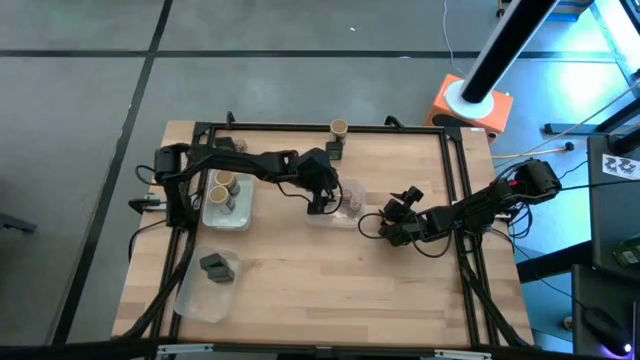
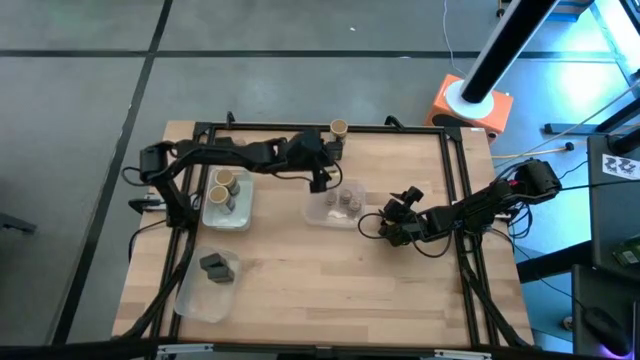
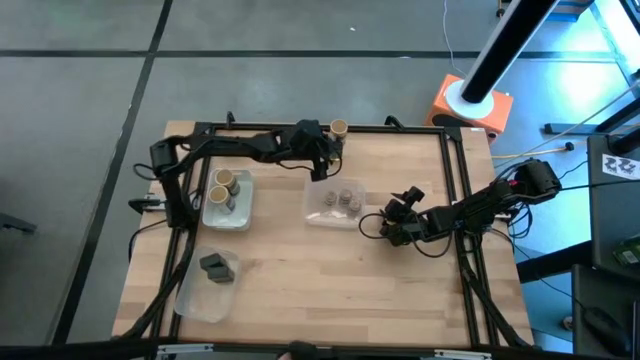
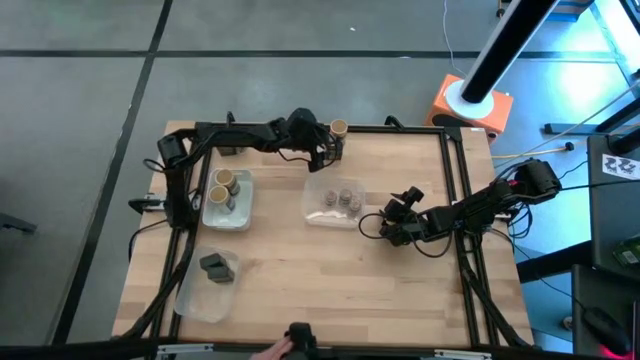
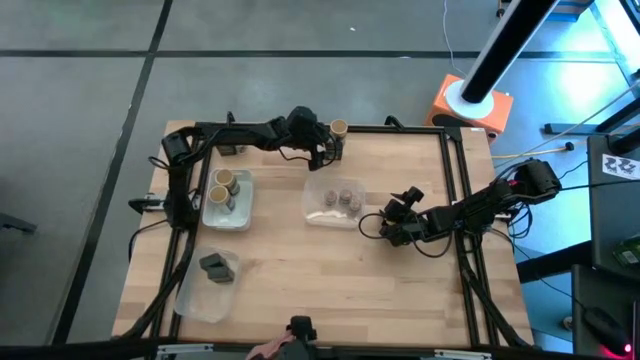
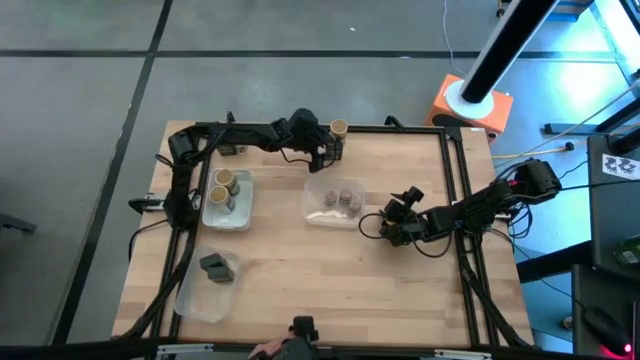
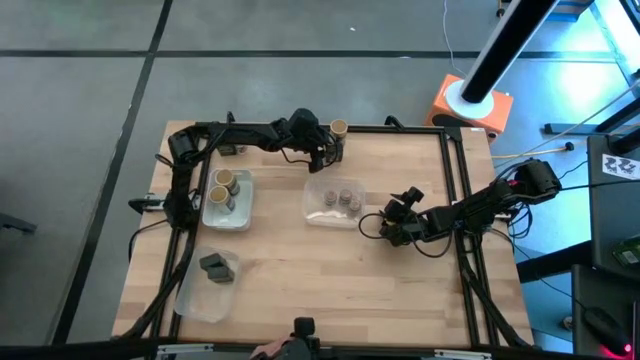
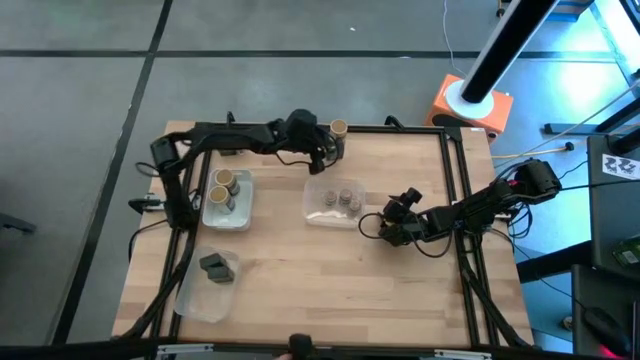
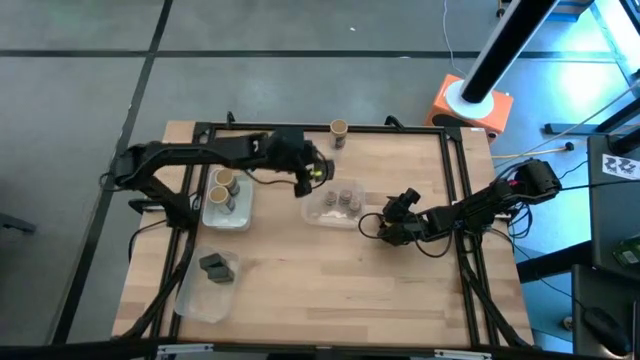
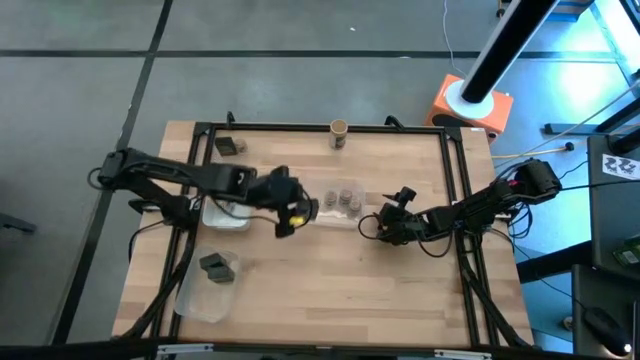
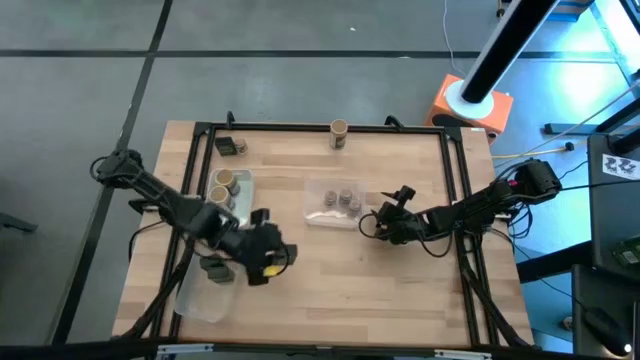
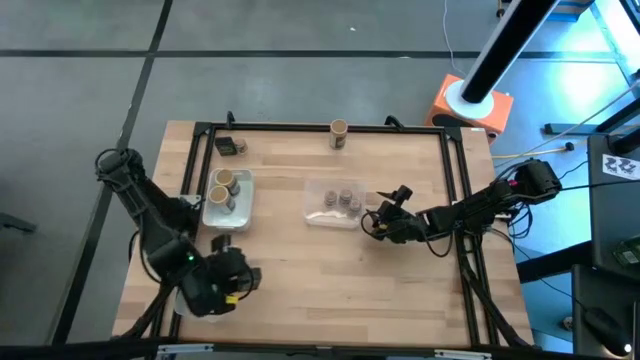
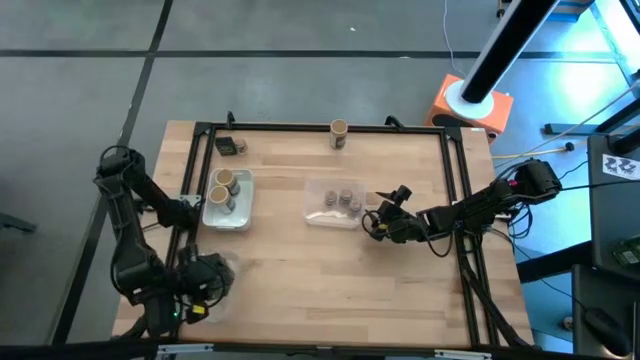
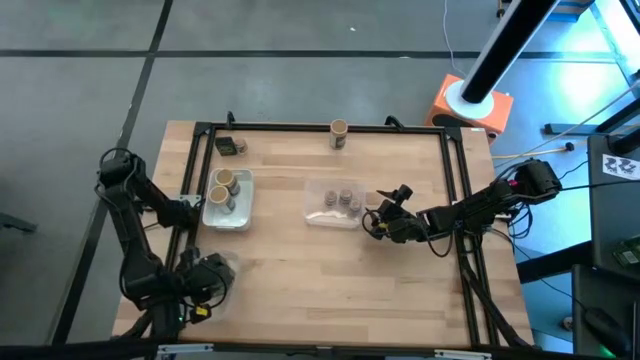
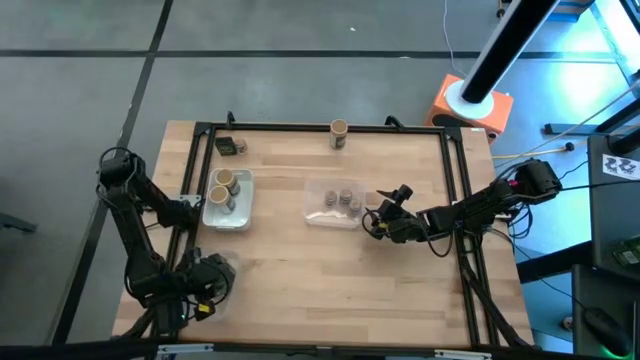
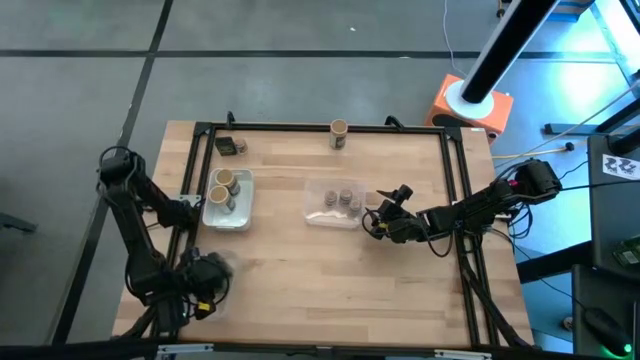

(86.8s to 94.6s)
Task: Sort spices by type
Put the black seasoning can into the bottom transparent bin

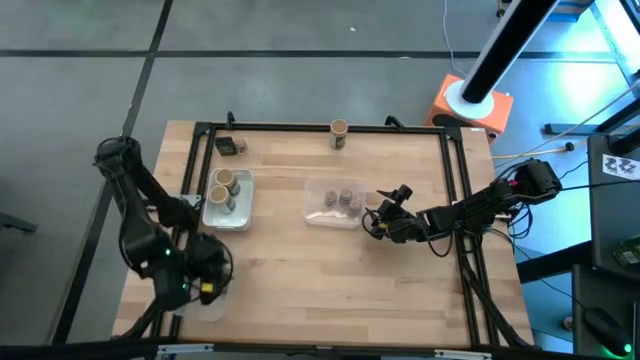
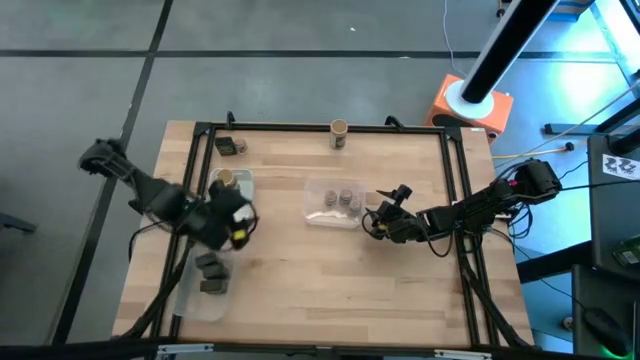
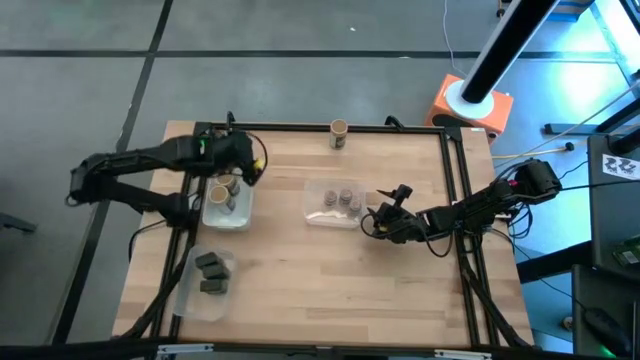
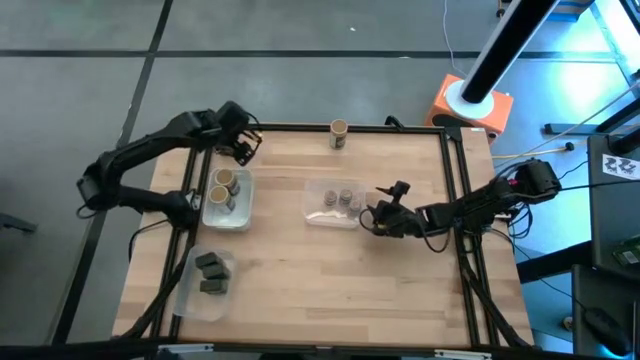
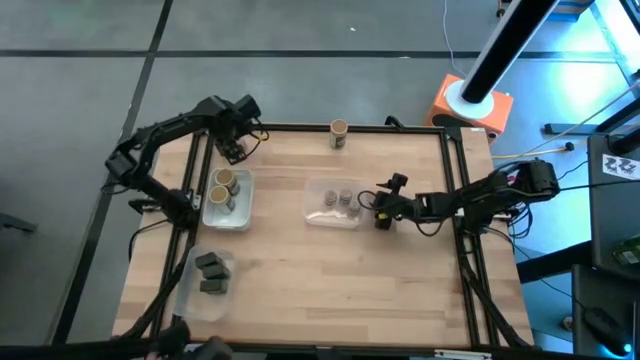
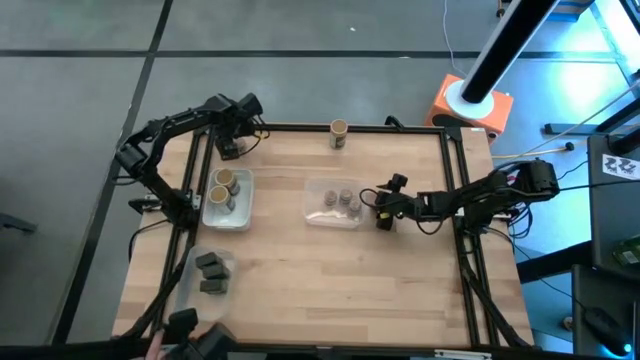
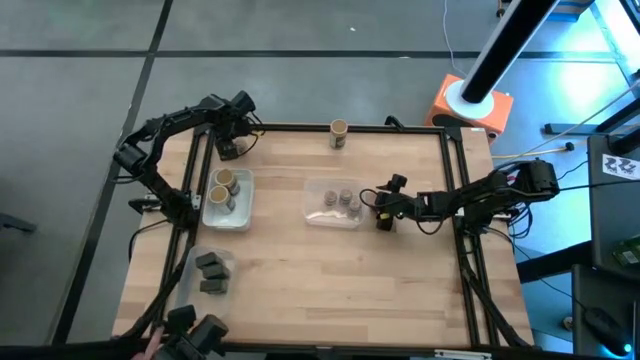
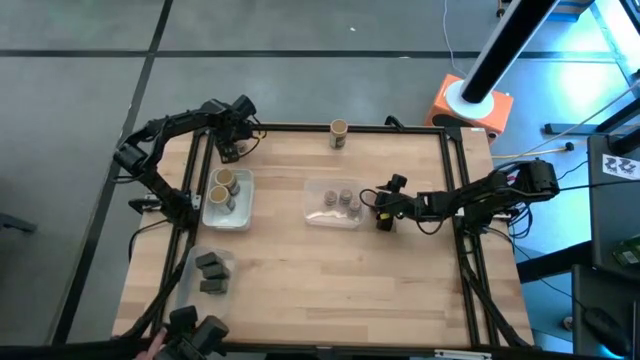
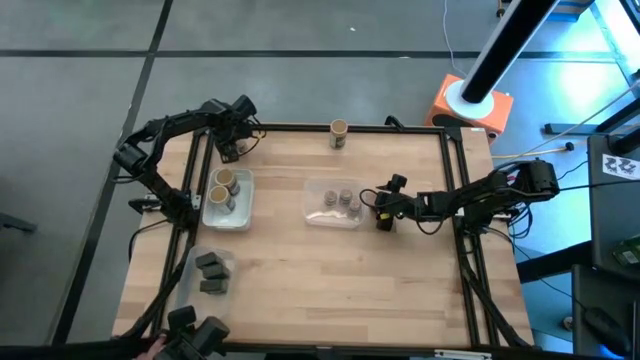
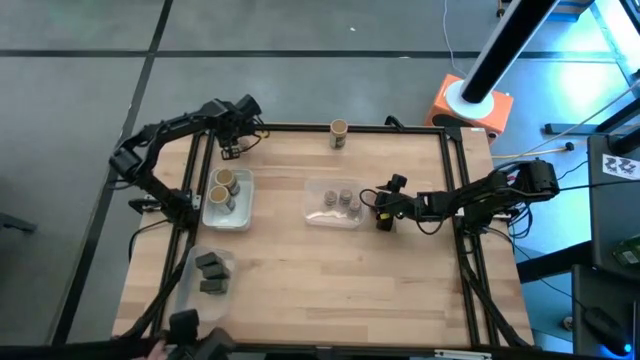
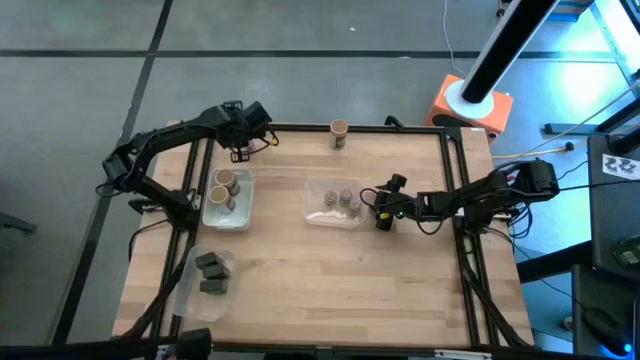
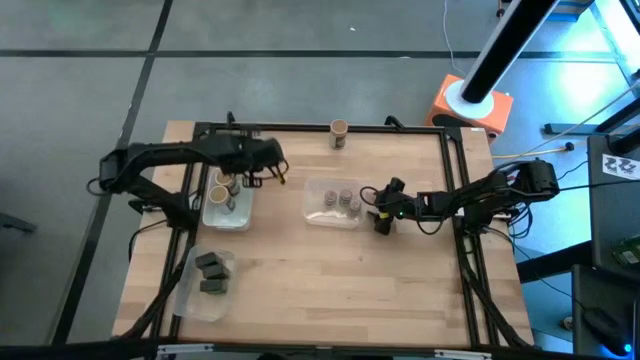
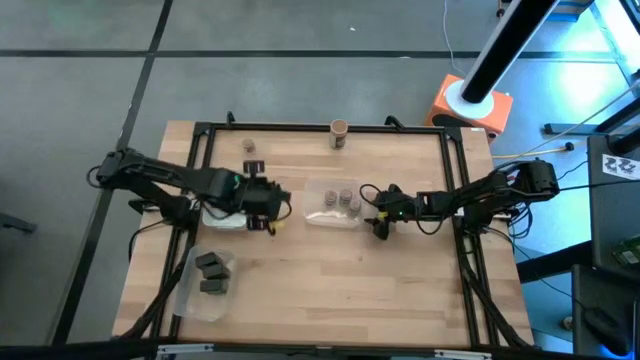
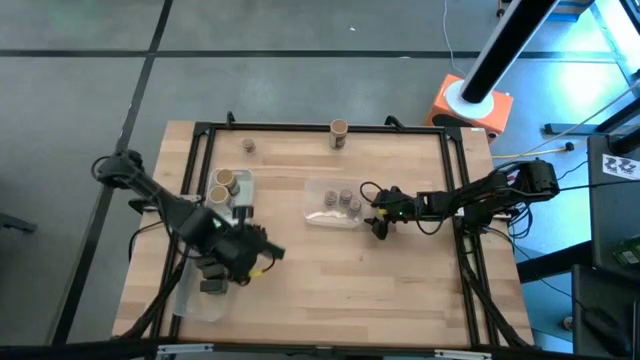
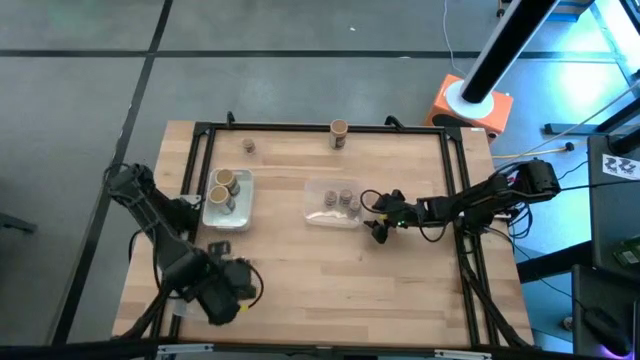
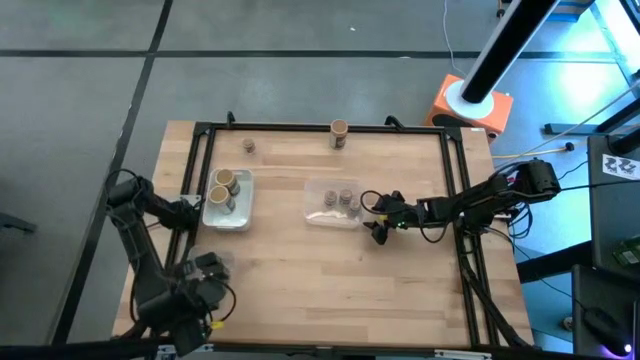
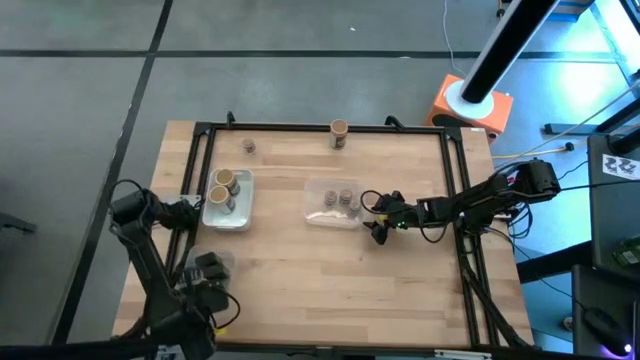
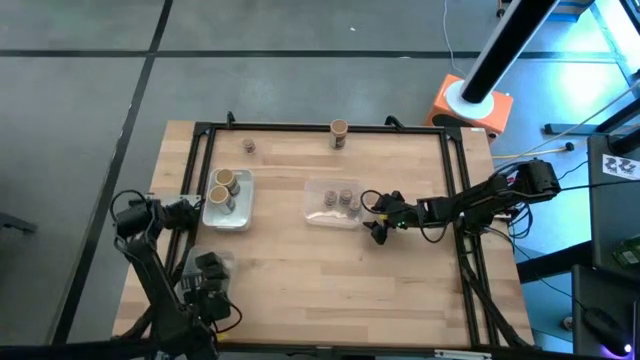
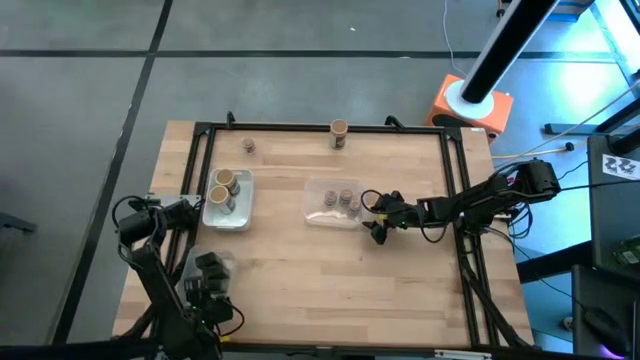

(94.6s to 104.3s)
Put the black seasoning can into the bottom transparent bin

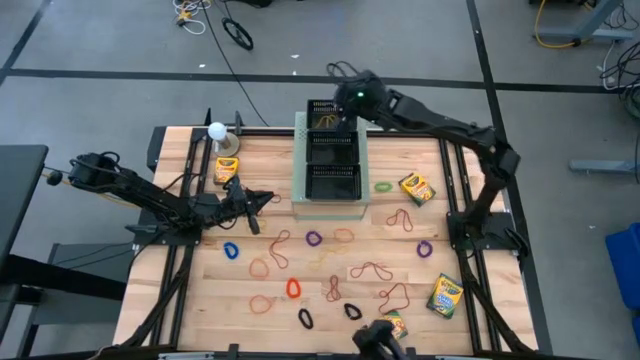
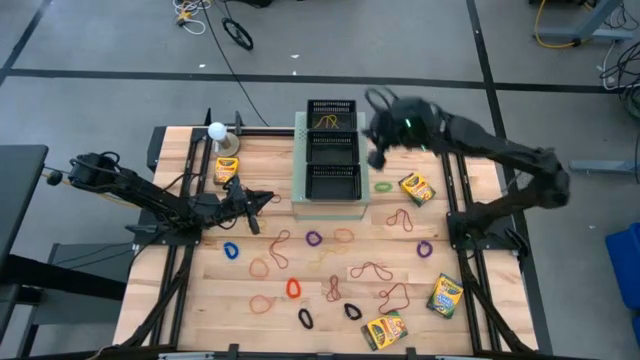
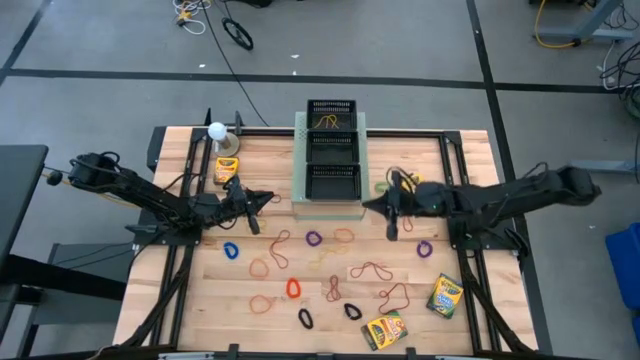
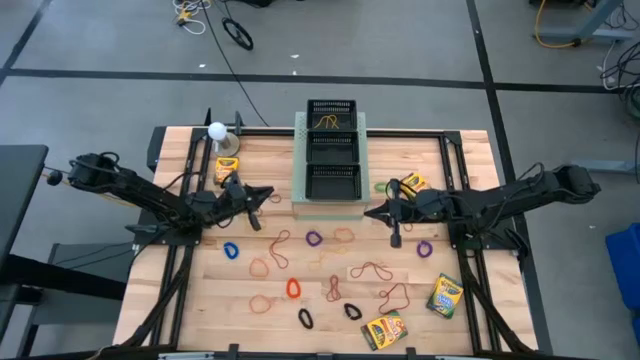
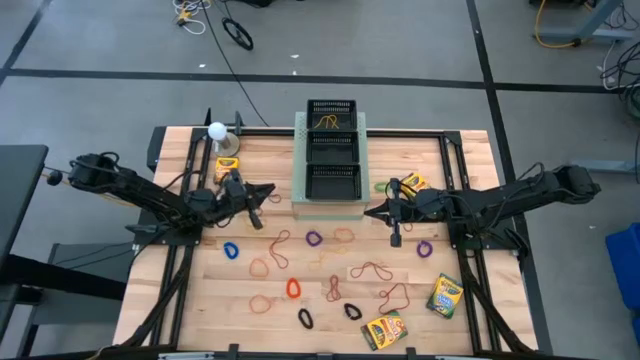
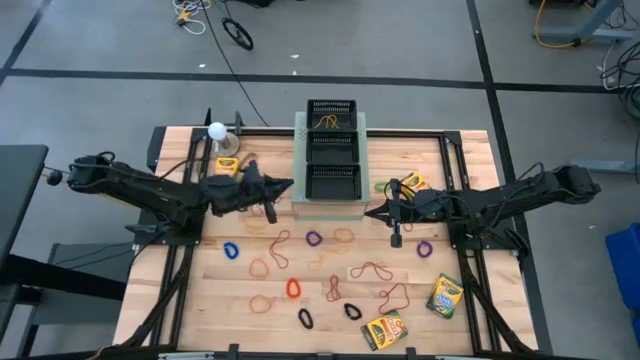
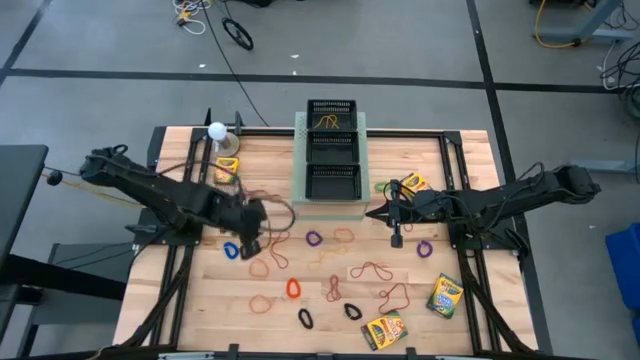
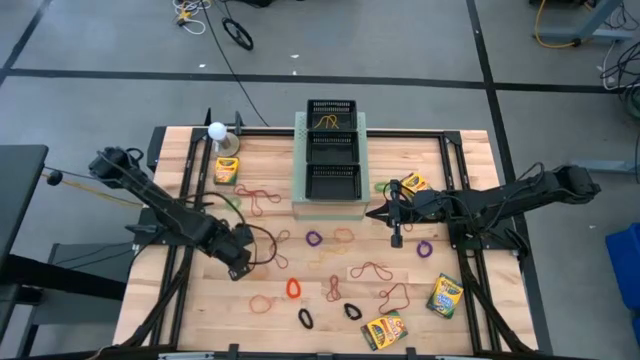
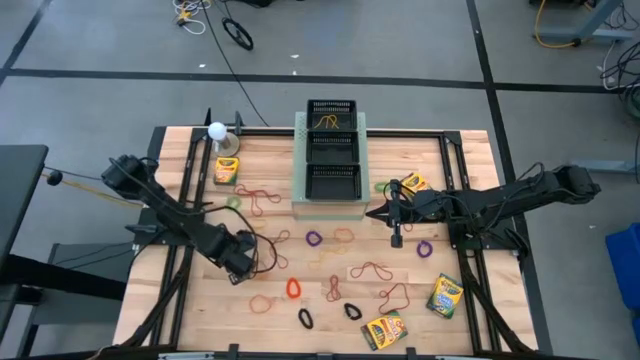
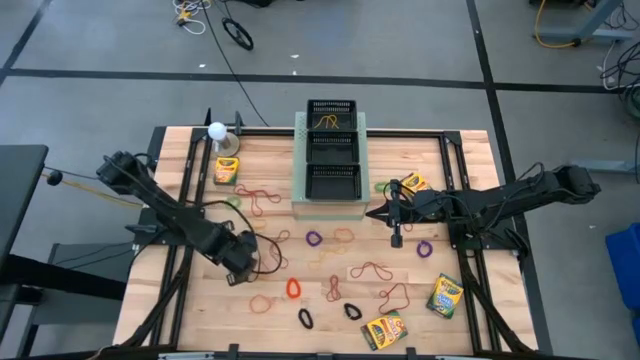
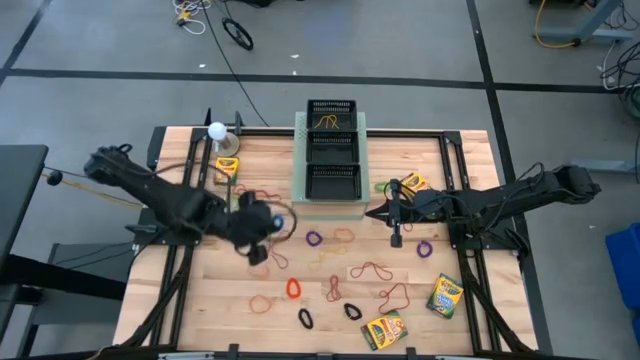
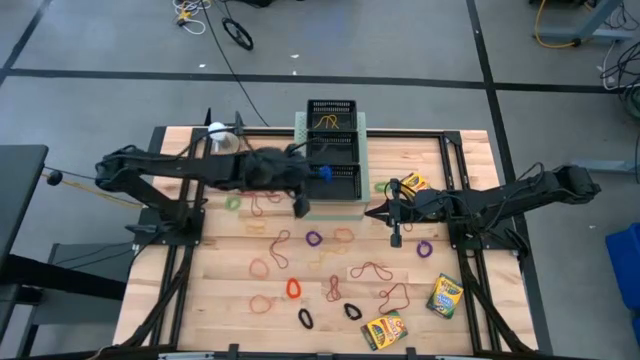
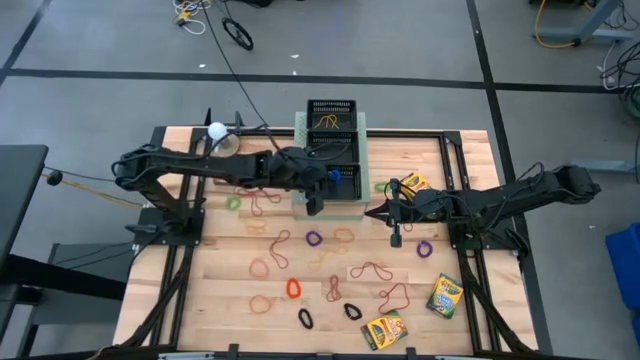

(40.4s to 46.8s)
Task: Pick & Place Office Desk Supplies
Put the blue spring keychain into the bottom black bin on the shelf
